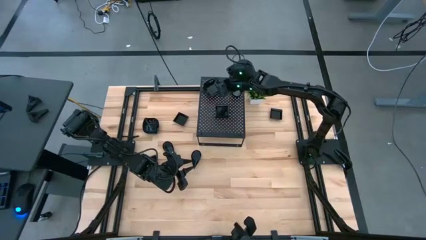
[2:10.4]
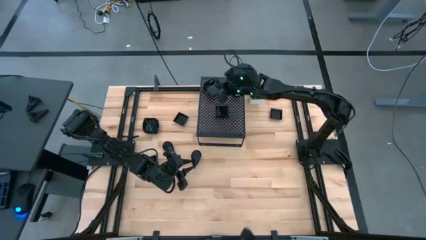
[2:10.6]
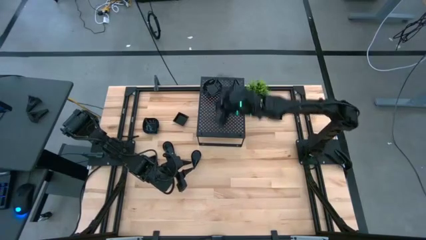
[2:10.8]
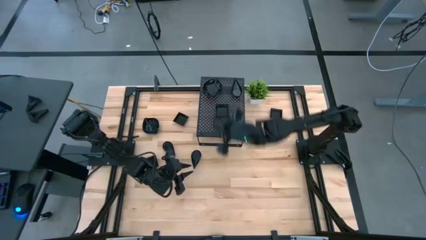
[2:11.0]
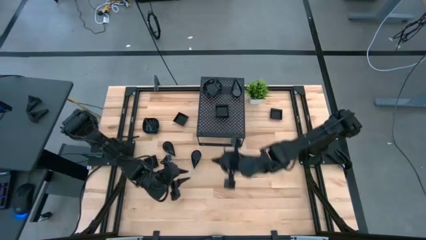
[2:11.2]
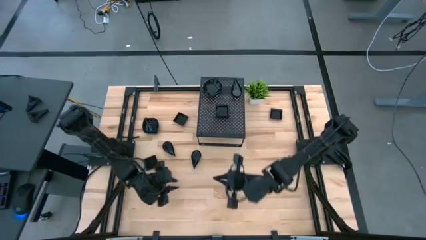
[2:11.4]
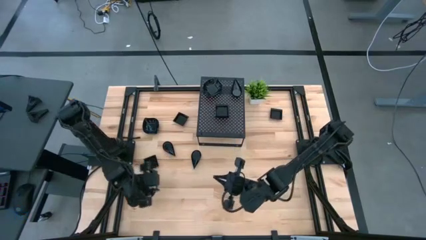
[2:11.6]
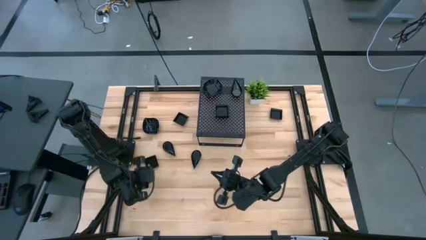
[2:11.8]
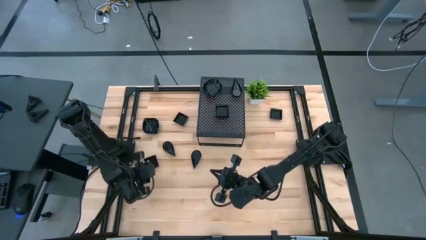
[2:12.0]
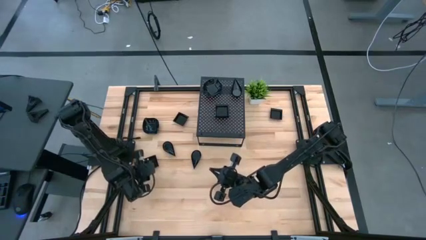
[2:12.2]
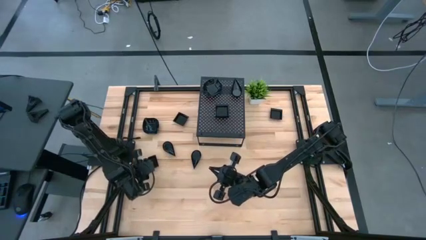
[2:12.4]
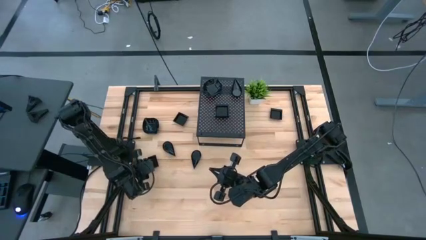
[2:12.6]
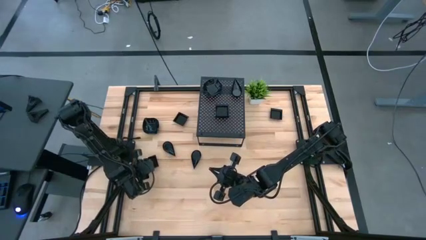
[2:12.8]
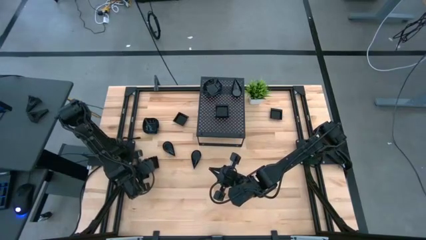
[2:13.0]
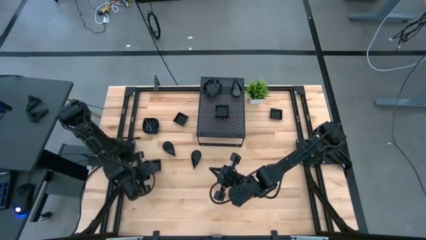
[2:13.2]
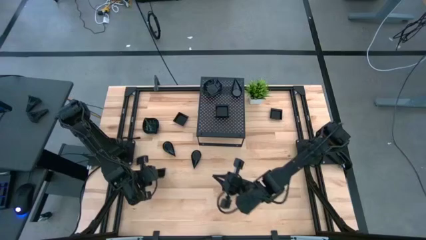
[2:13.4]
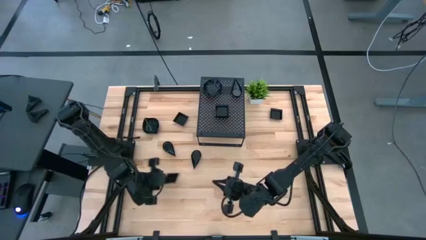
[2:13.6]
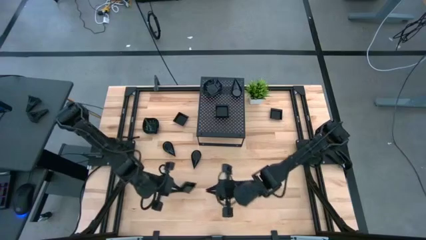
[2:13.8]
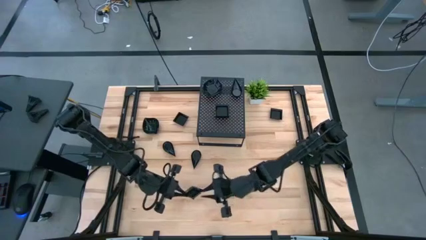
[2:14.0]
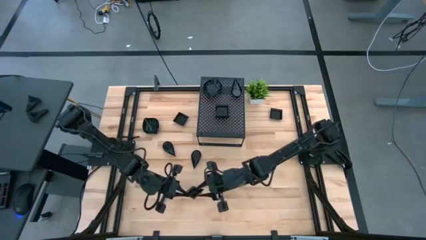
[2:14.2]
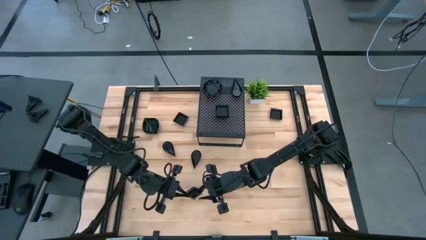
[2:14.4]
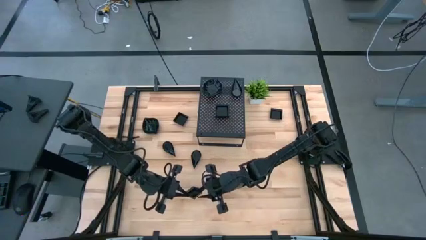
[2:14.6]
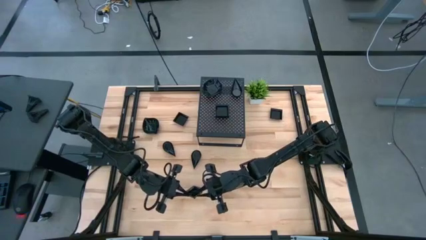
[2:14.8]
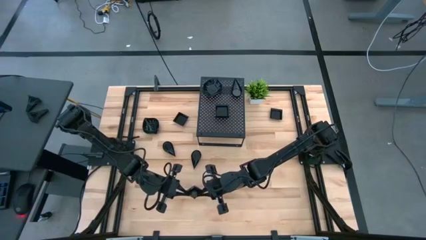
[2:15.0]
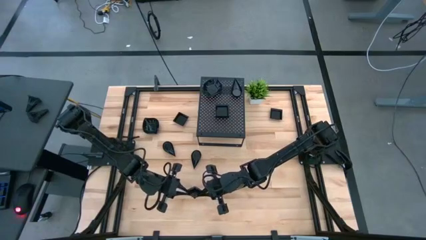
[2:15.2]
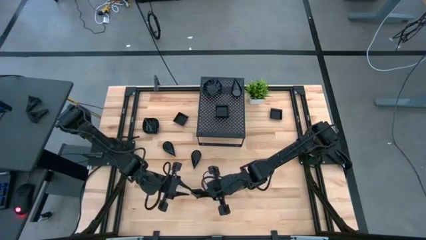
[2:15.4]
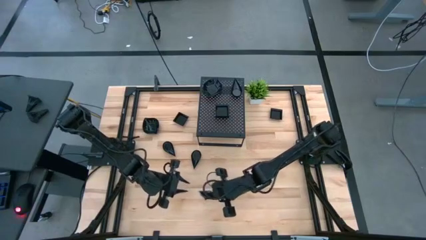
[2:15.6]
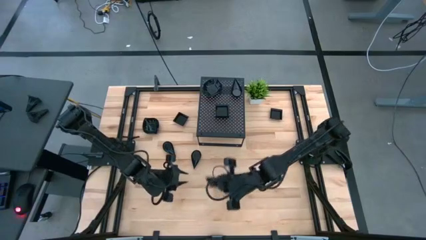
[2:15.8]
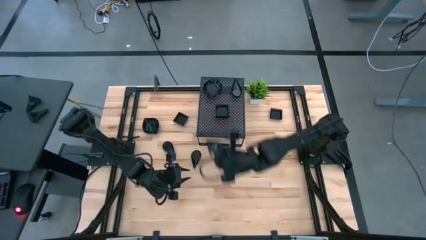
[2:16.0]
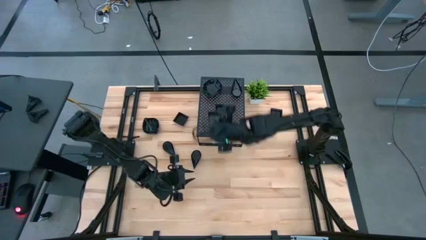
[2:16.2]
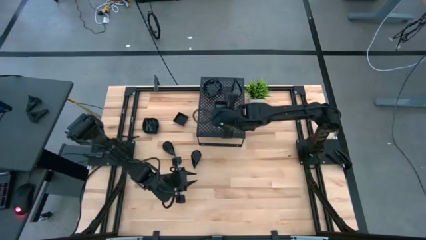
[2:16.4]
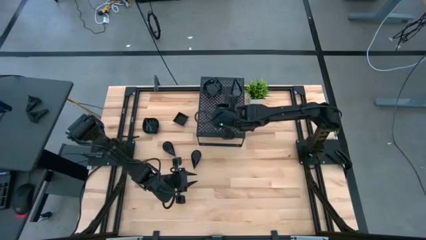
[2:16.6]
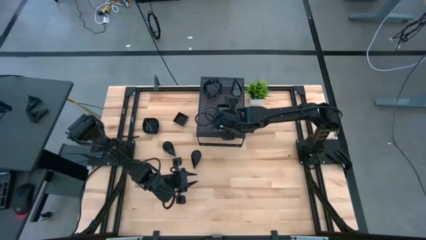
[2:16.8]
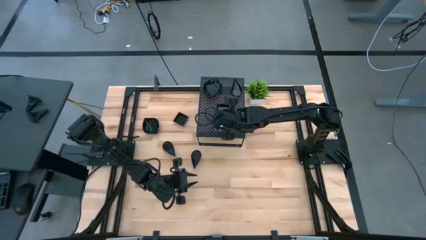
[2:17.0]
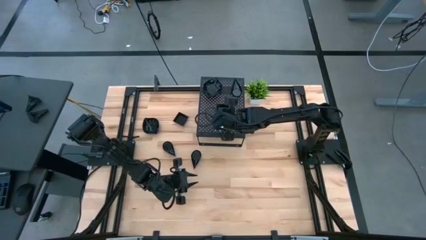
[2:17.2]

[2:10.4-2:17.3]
Task: Pick & Place Mini shaped plates
Stack the black square-shaped plate on top of the black square-shaped plates on the shelf

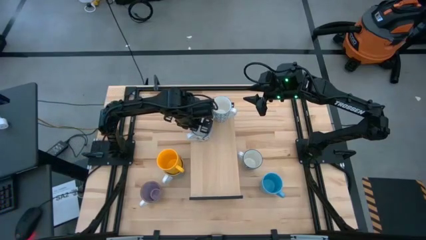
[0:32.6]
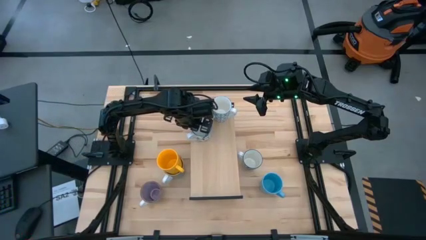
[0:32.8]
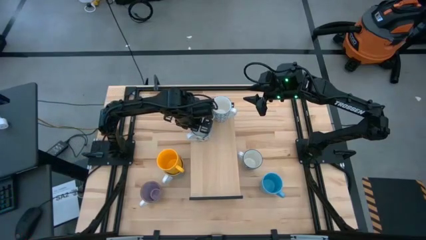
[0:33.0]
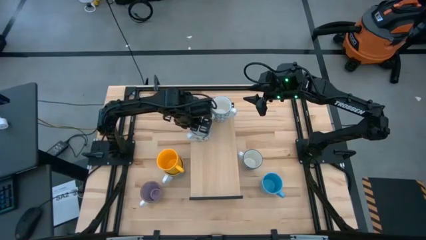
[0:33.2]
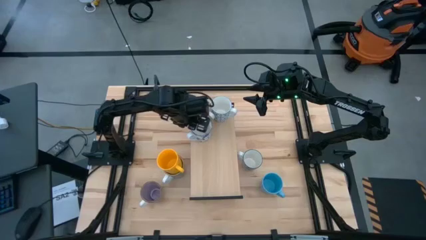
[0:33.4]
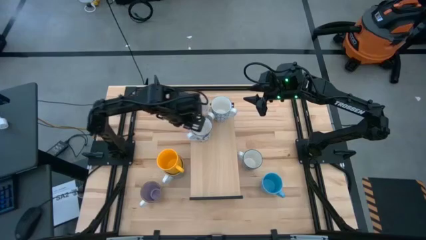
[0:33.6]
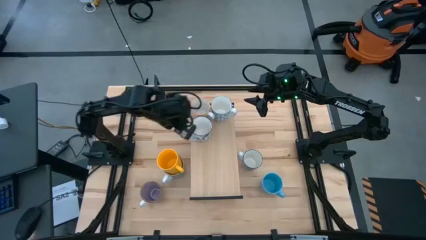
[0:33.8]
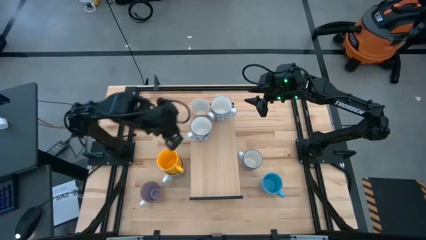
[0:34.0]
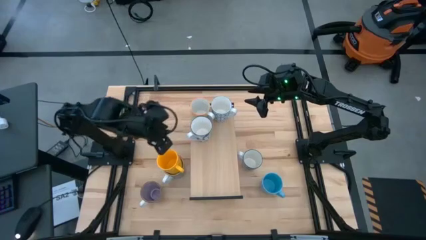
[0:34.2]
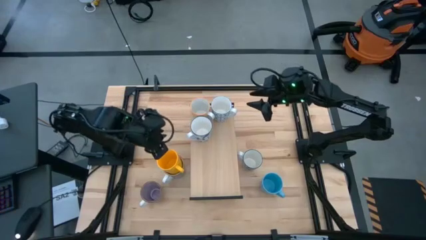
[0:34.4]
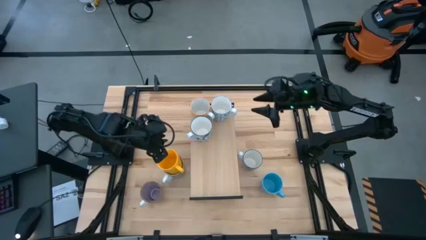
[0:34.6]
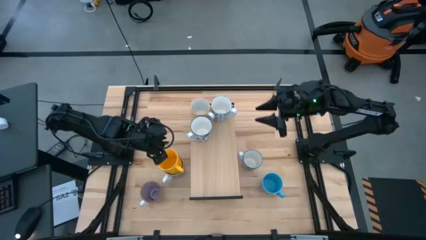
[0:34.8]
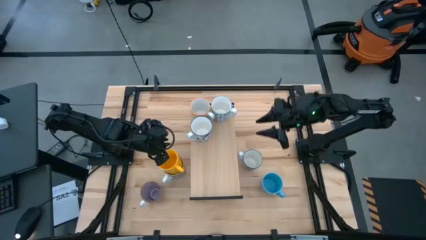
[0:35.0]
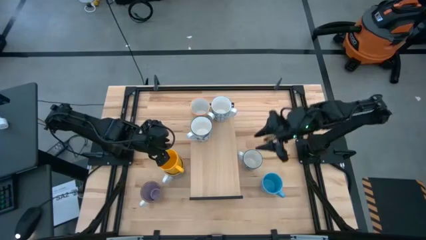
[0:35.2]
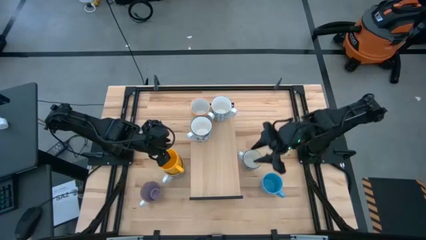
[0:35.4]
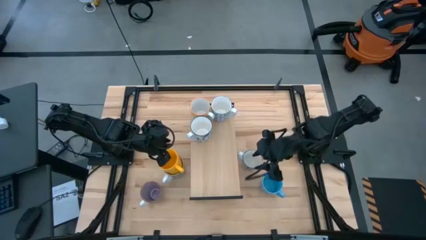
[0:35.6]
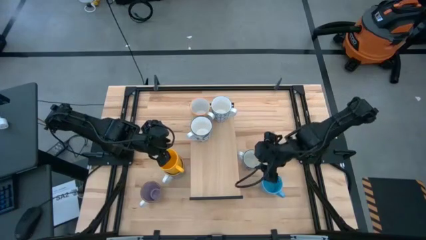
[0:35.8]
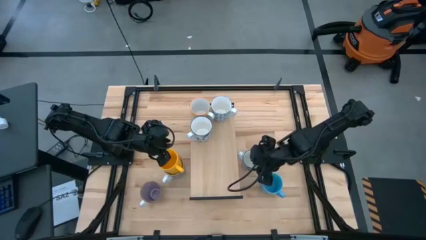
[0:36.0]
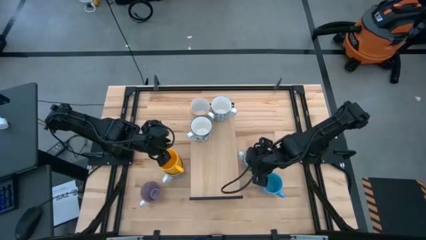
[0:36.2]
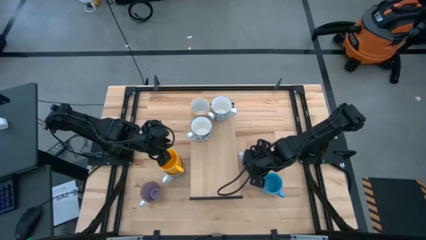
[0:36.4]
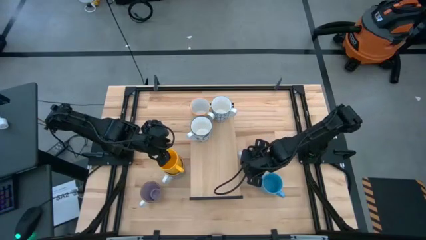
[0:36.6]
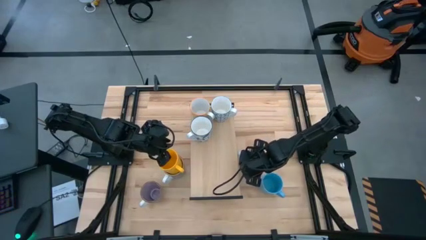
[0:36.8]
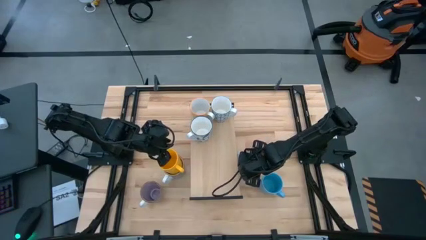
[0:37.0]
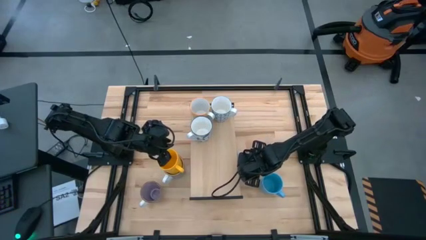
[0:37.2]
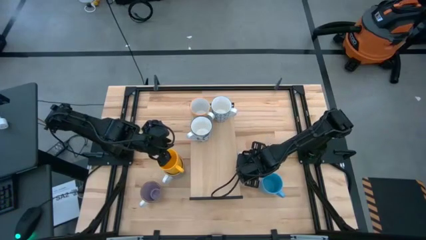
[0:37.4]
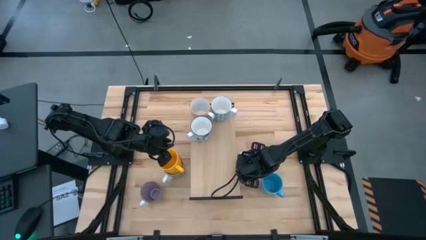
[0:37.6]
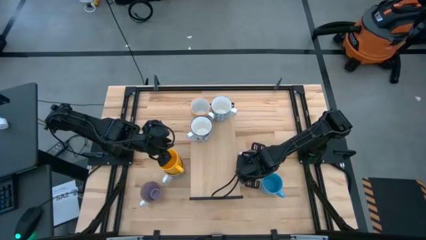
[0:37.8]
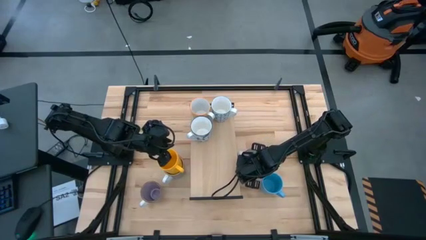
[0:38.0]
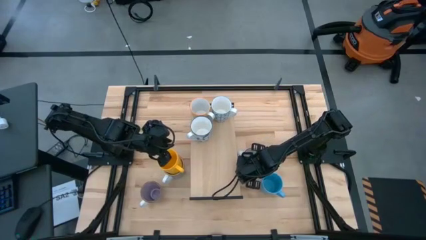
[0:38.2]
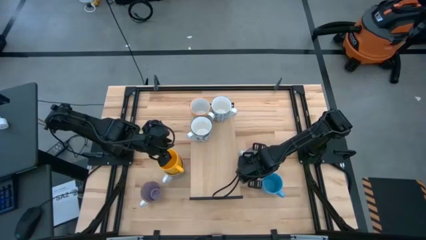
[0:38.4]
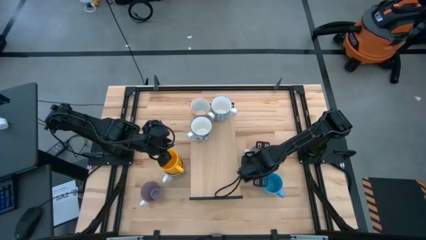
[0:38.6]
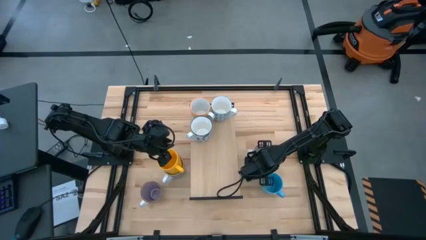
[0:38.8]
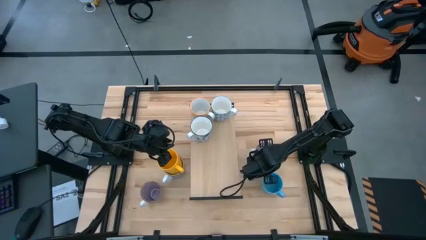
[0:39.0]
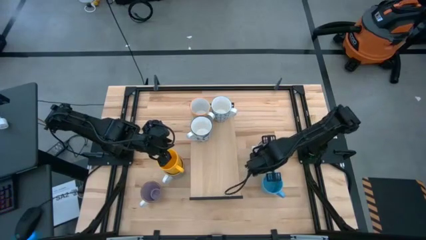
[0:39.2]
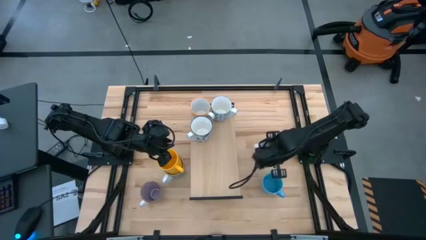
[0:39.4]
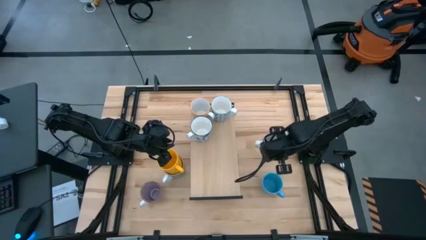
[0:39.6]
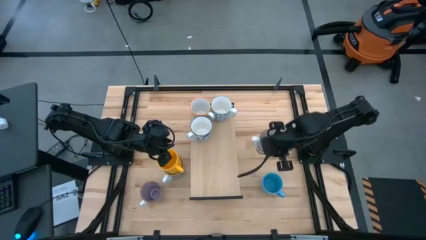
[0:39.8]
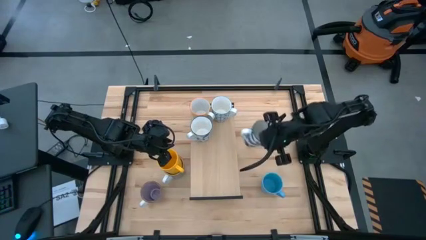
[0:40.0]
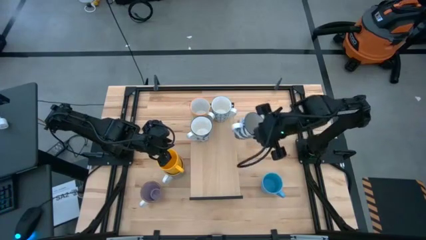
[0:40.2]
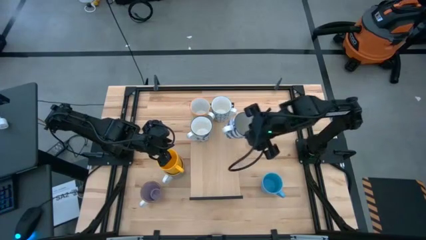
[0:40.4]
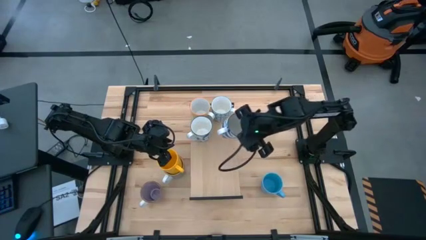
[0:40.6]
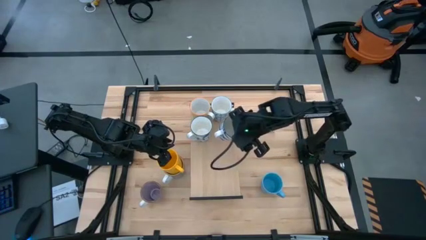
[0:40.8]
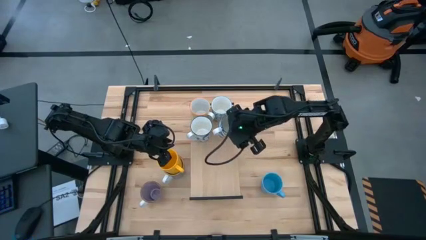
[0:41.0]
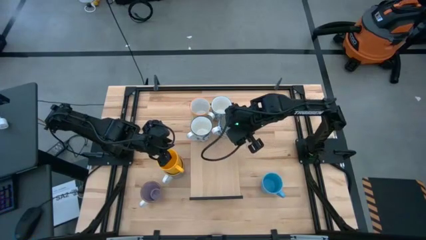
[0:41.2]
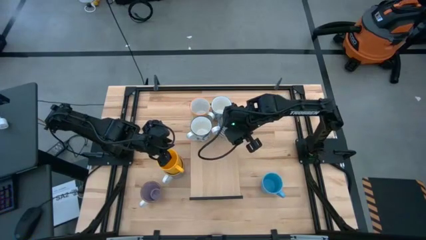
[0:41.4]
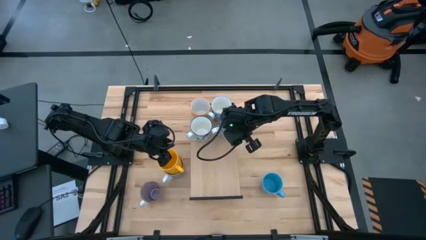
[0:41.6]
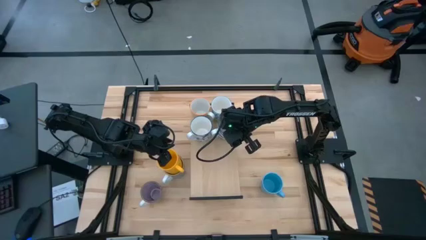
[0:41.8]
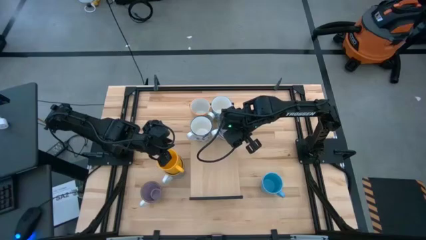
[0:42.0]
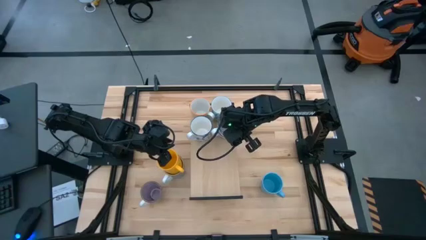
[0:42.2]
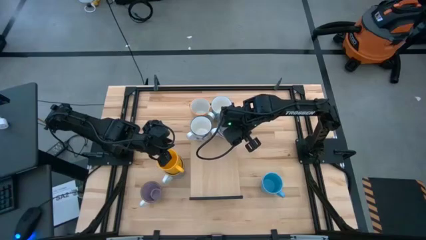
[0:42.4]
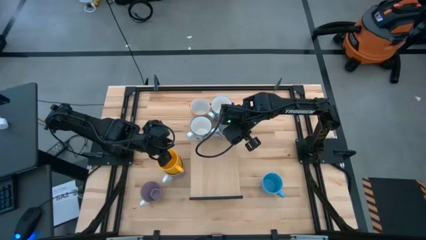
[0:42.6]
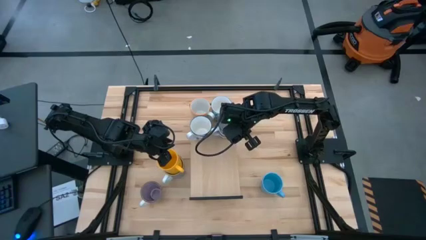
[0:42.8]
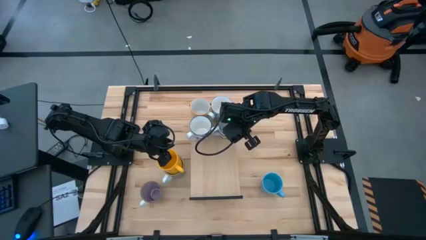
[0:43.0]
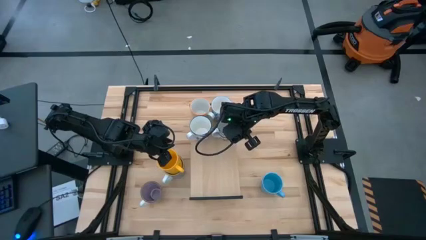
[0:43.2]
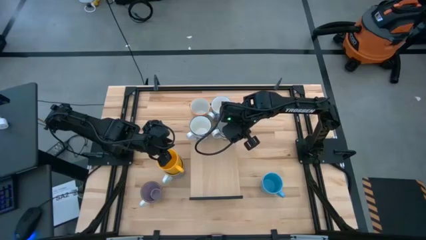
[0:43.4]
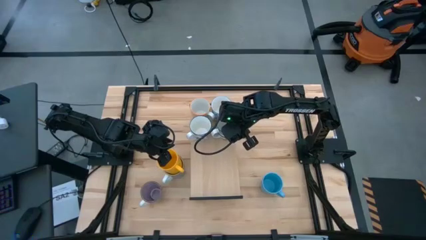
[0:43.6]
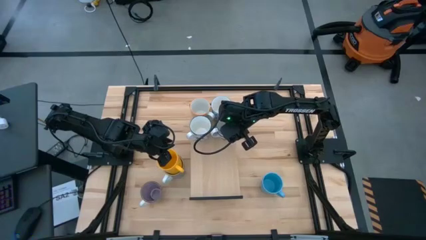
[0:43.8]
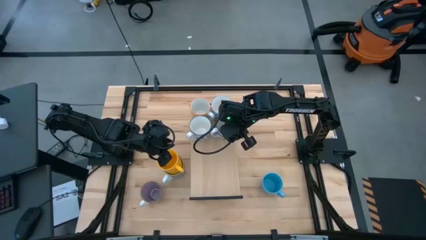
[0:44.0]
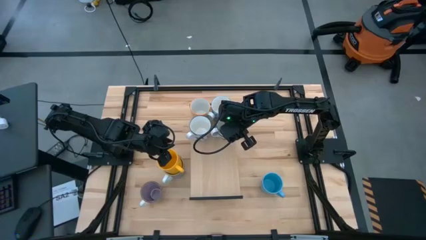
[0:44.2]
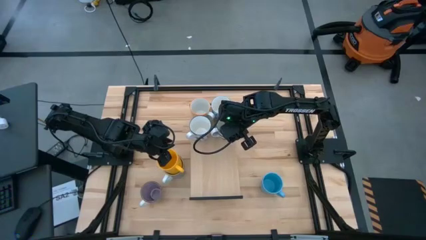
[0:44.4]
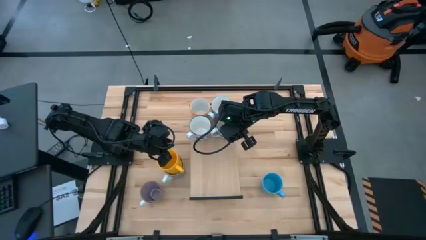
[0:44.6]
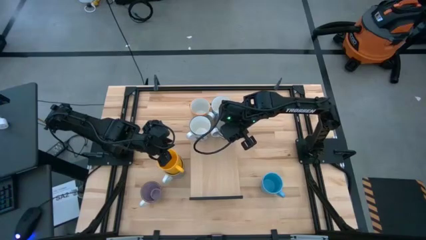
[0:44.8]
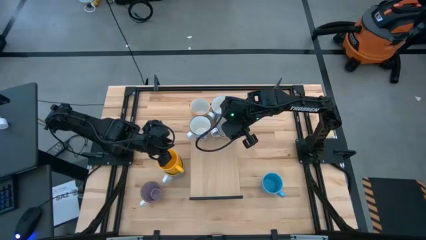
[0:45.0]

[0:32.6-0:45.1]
Task: Place coffee mugs
Put the blue mug on the shelf aligned with the other blue cup
